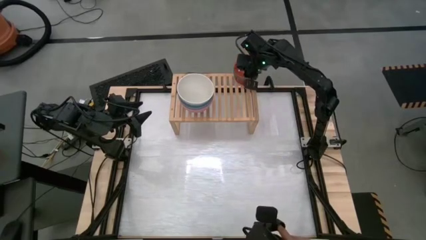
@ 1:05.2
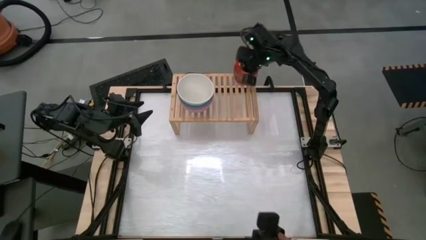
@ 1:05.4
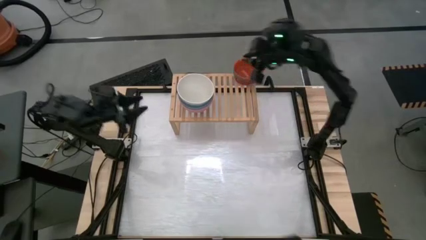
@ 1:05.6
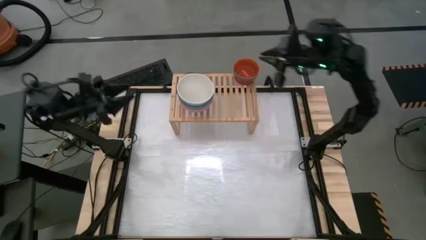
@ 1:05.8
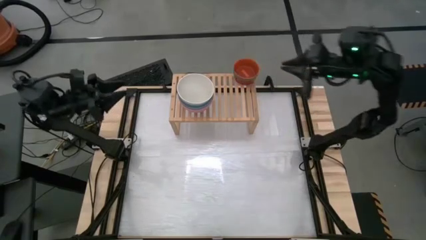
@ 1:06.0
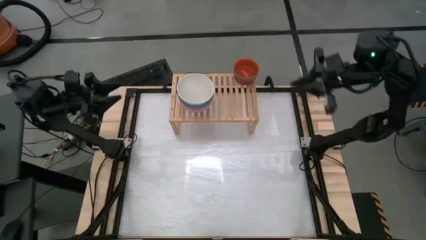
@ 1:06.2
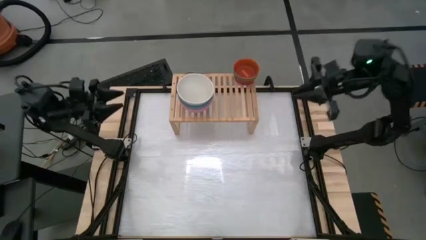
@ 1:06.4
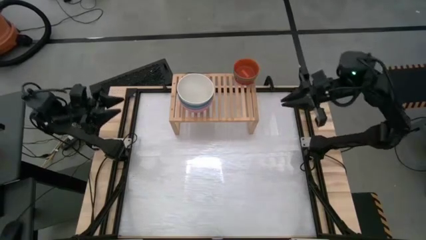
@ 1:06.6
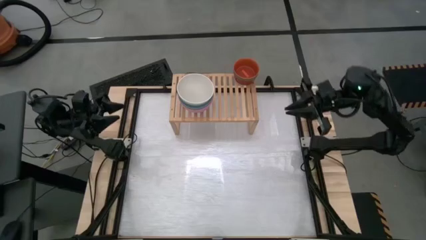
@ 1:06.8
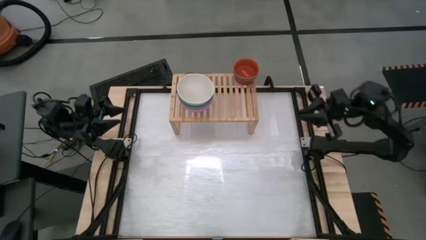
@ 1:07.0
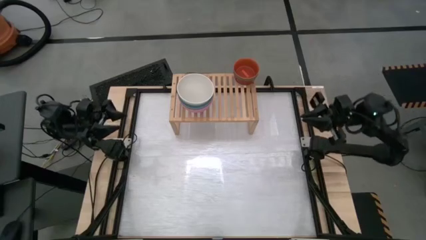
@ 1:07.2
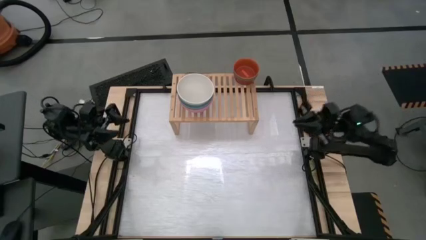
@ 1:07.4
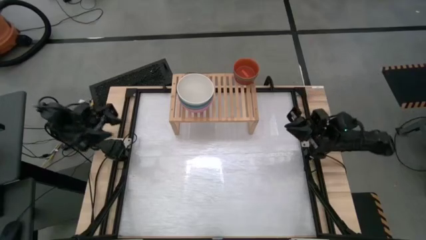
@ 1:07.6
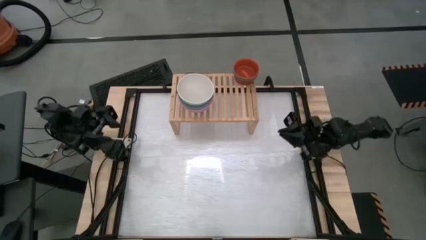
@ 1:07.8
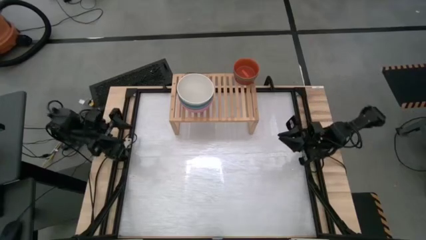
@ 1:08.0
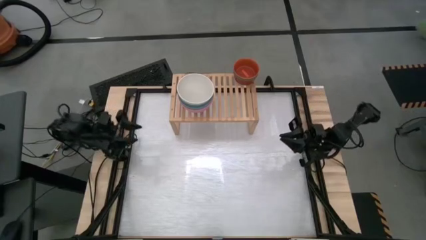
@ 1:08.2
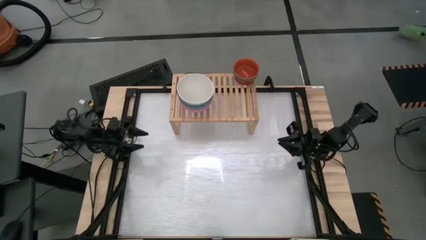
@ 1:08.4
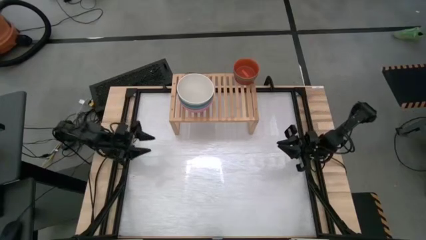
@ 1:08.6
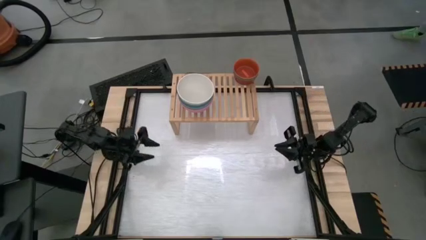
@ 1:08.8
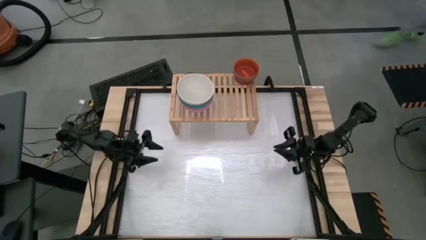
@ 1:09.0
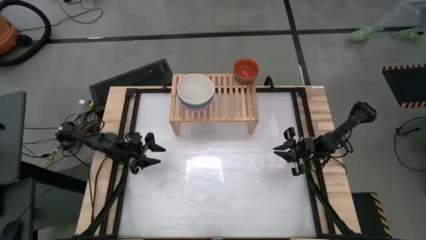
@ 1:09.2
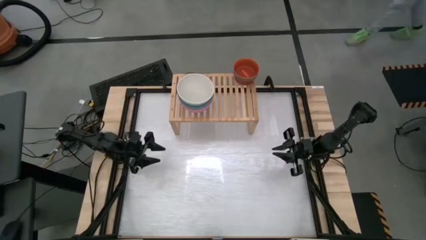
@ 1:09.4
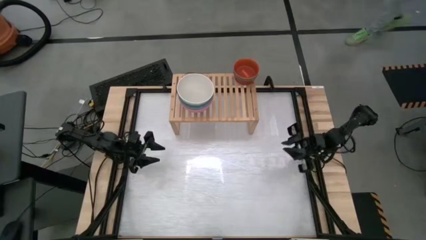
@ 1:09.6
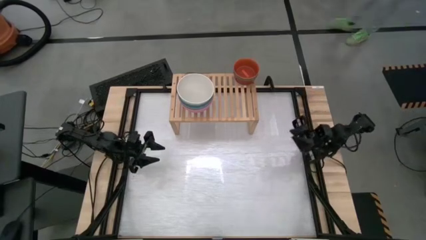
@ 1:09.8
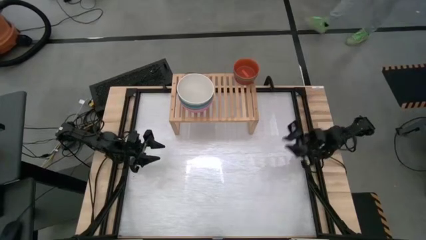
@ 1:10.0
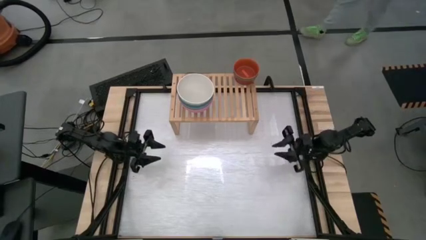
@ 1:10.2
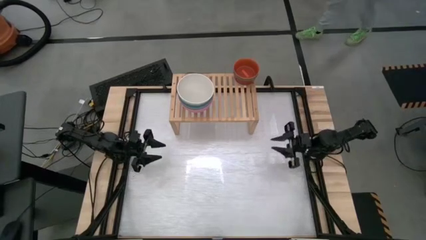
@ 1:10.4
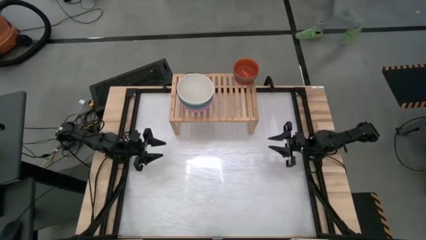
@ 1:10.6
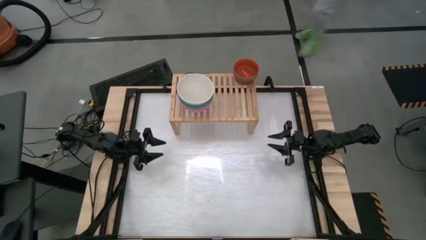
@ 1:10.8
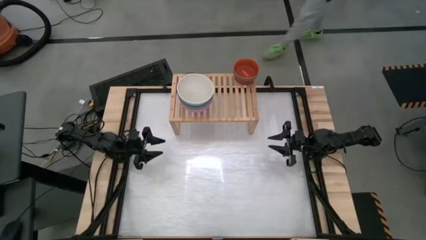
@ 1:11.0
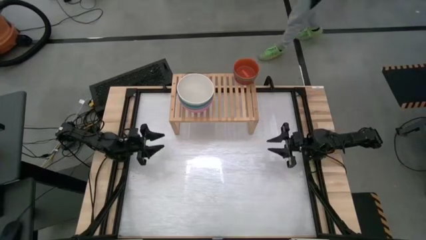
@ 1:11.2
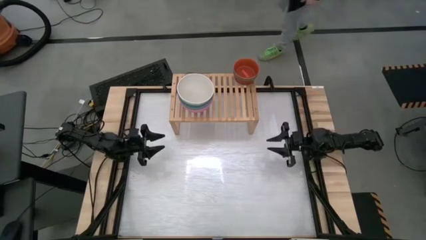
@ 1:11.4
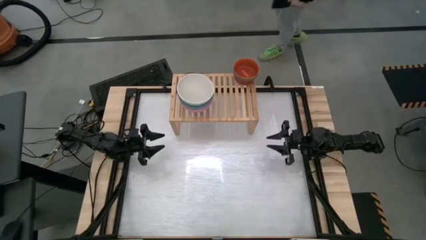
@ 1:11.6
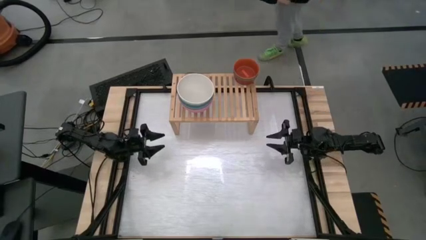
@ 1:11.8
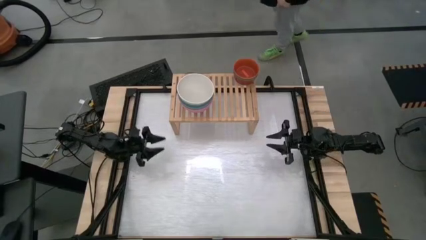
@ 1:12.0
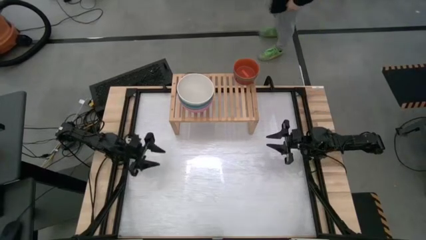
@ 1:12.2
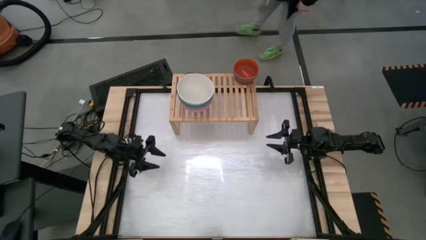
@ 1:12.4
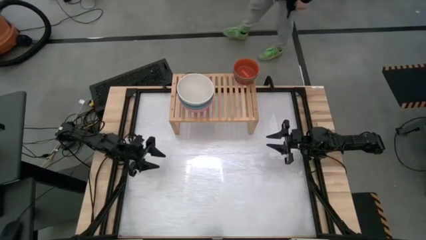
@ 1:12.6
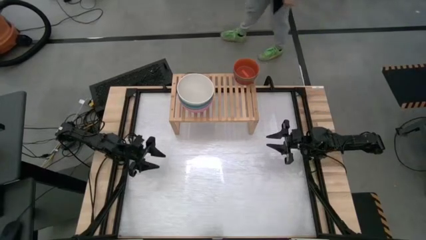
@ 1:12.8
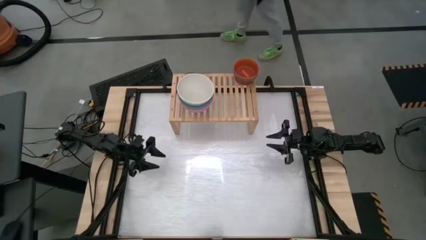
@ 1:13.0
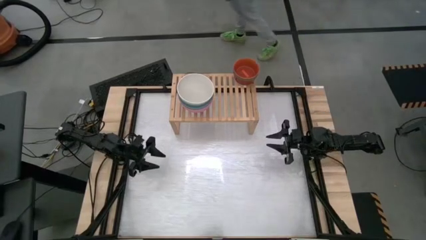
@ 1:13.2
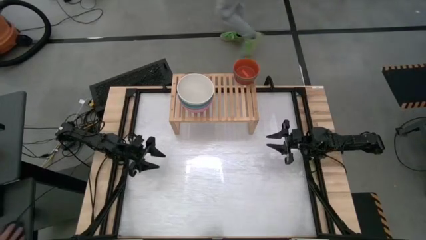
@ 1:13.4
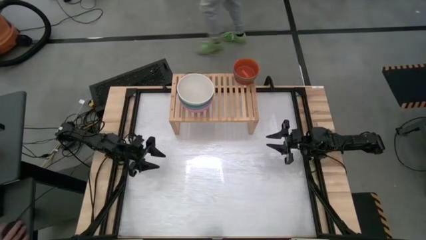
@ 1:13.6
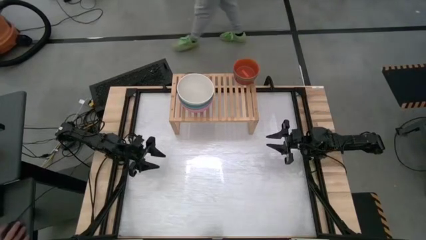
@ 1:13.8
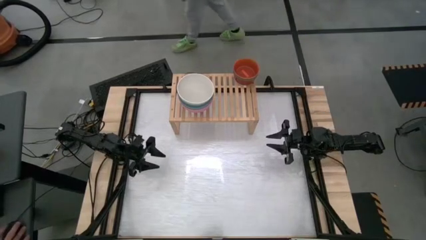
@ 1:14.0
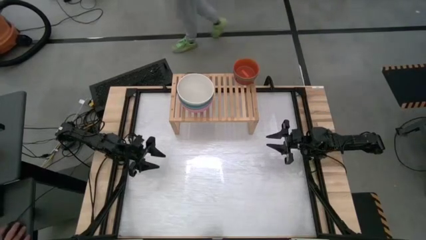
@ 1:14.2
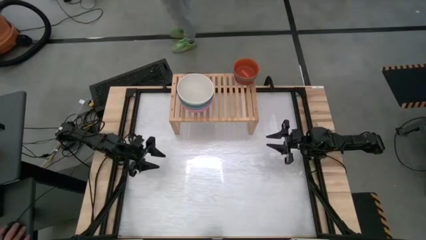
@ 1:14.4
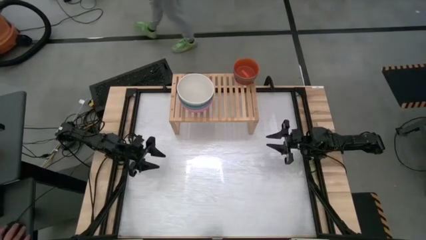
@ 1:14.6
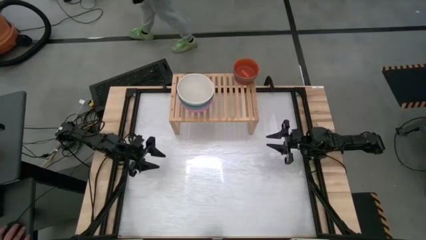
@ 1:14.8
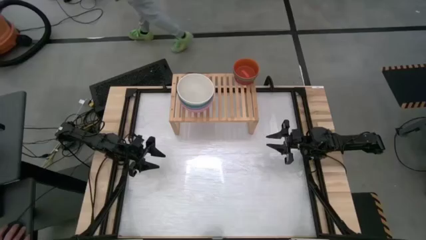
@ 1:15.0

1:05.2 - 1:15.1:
Task: Place and stack bowls onto a shelf
Return to Home Position

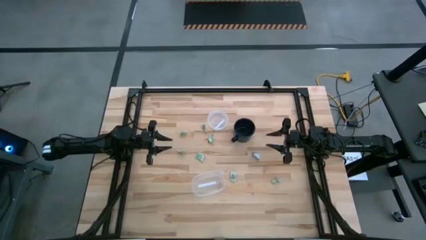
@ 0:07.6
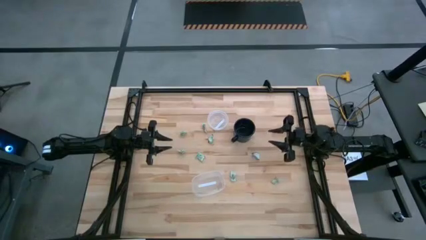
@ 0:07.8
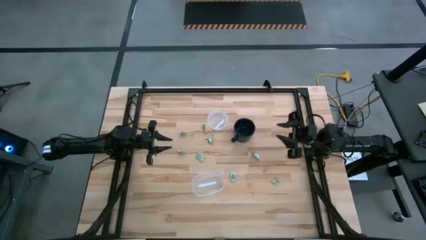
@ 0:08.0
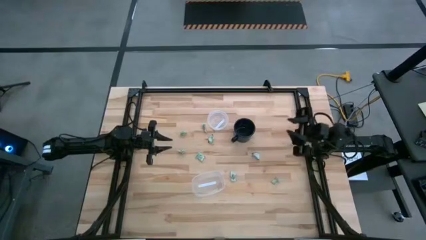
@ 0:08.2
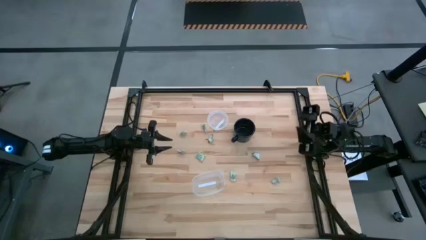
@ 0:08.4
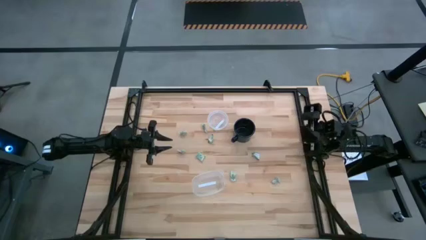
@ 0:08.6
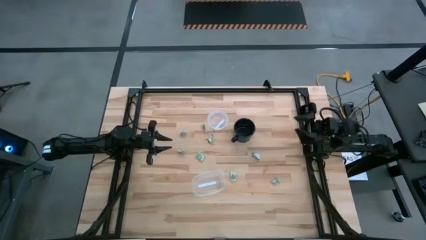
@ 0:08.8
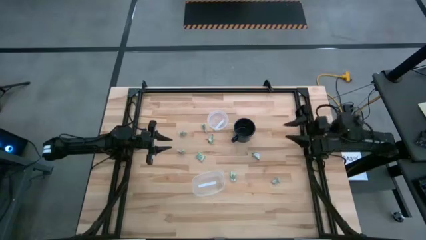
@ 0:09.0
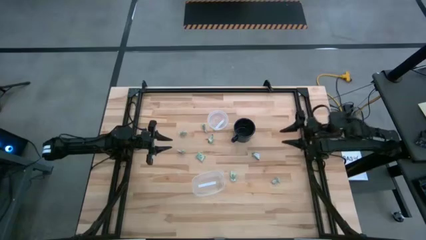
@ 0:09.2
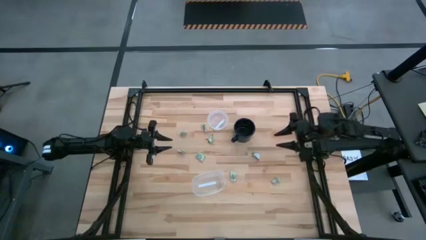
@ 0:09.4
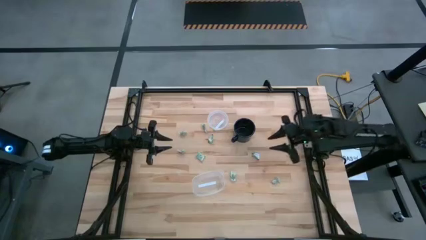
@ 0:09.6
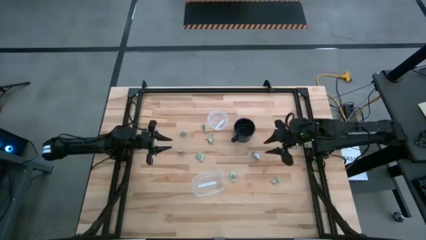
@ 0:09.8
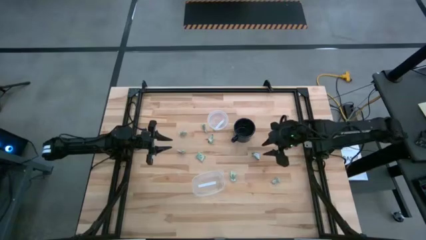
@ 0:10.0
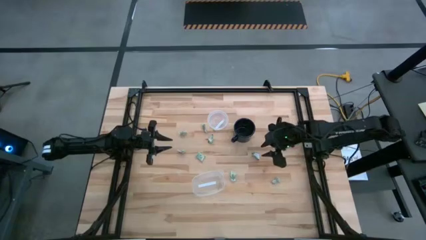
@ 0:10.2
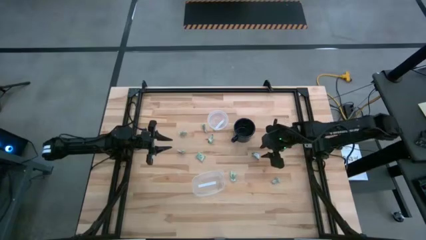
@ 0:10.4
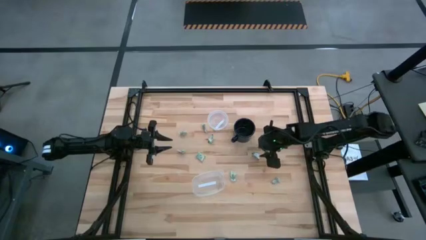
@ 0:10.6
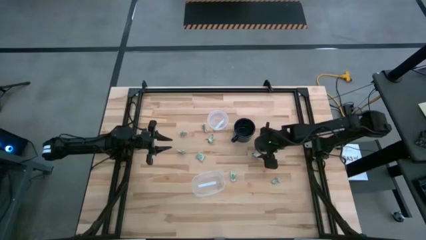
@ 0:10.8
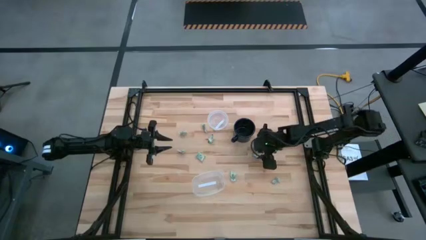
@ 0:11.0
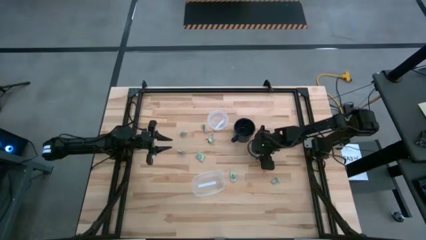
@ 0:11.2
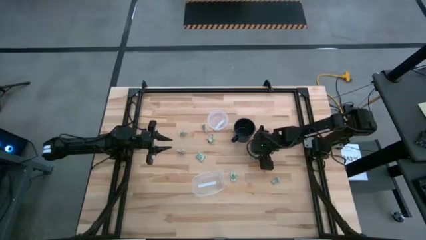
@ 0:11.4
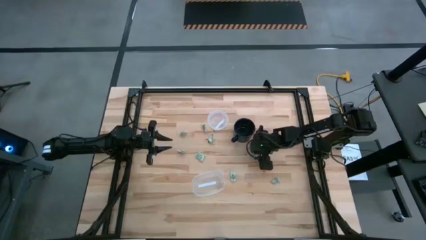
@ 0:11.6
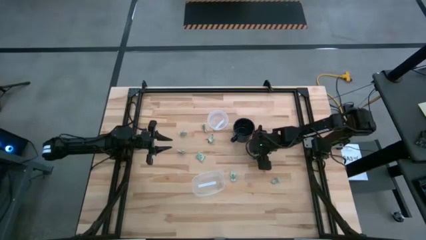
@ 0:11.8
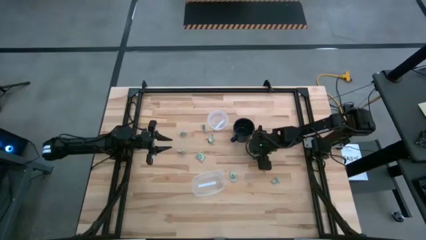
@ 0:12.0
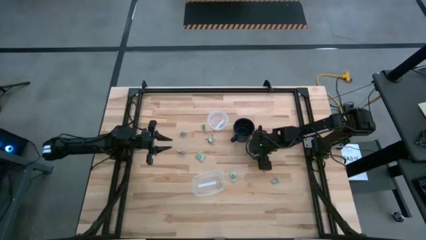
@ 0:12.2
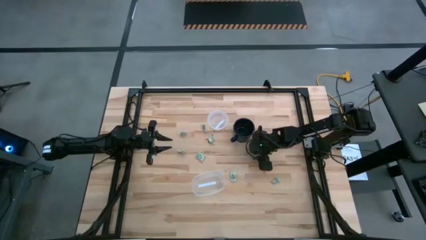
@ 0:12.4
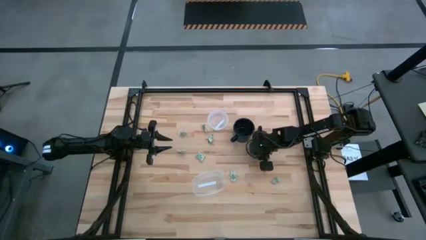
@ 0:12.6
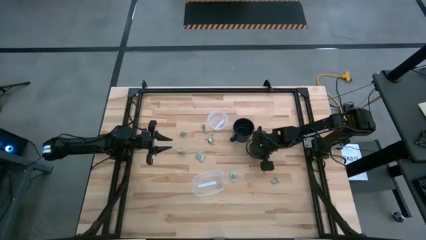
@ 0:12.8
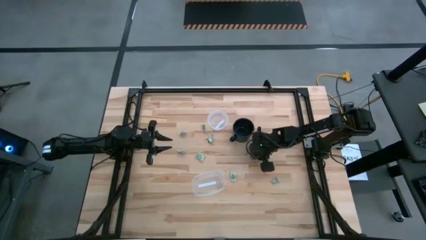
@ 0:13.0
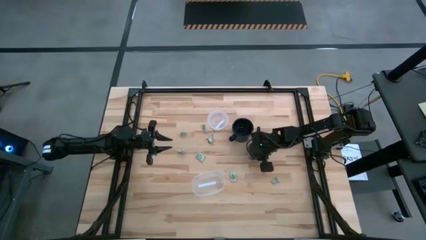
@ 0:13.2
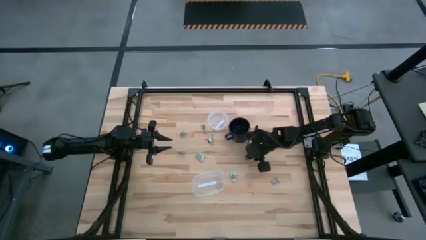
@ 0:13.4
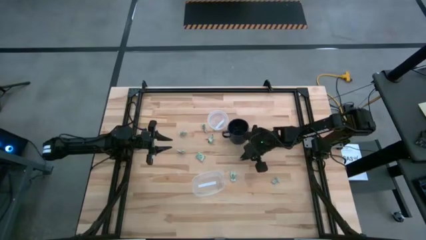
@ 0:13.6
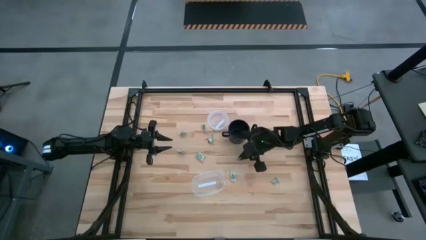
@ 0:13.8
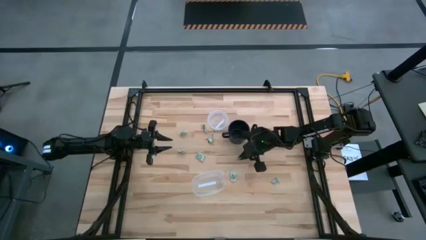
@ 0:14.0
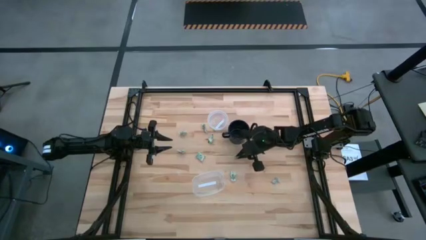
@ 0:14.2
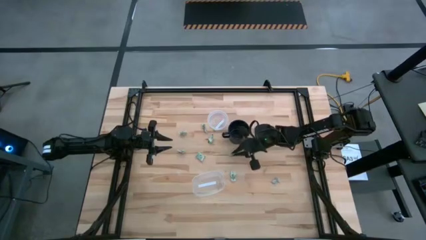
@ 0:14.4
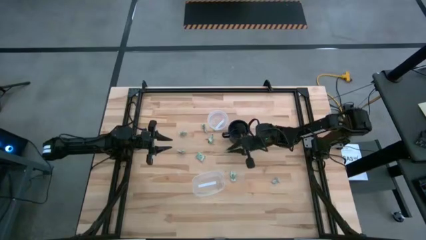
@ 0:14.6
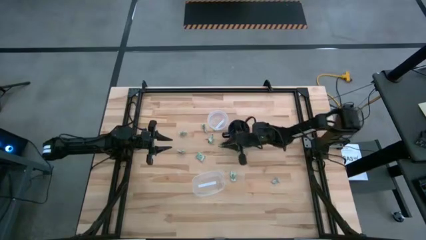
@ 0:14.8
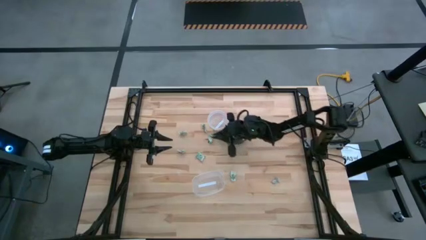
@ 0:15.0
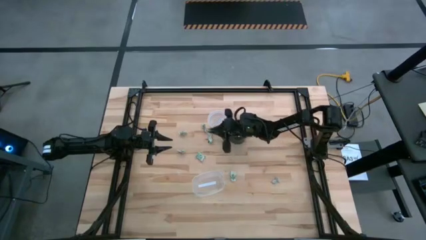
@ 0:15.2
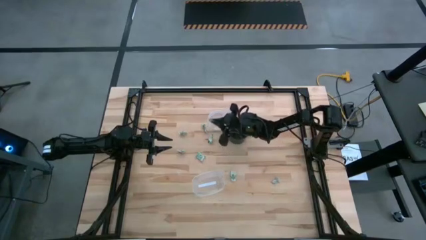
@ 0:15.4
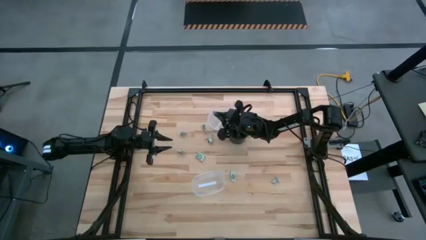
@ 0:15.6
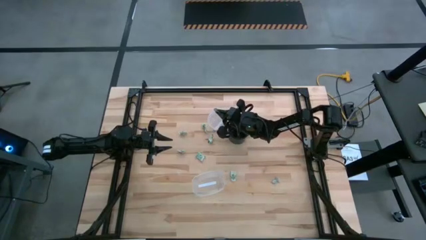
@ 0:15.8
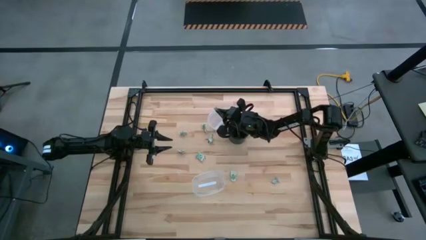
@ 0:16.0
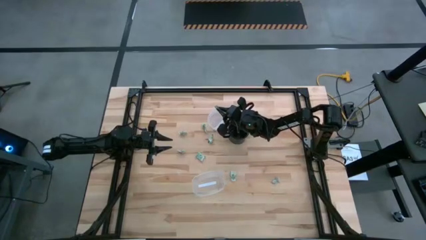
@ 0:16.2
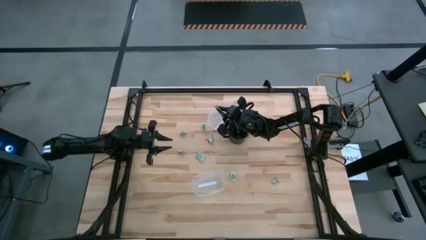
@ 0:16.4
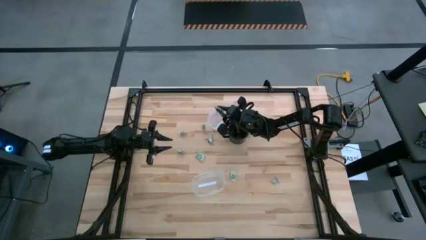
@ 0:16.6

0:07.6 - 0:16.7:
Task: Pick and place Stevia / Truvia into bins
Put the truvia packet into the top transparent container
